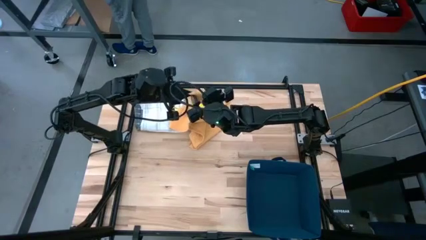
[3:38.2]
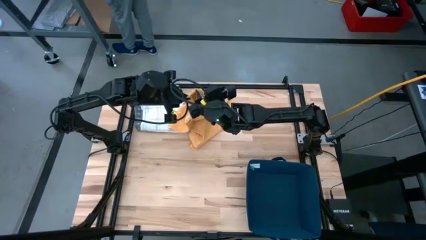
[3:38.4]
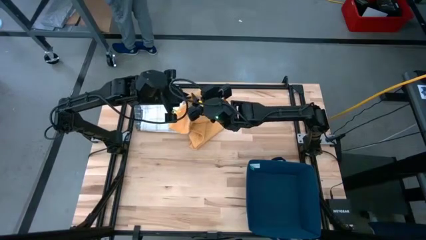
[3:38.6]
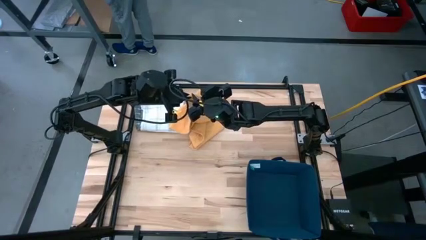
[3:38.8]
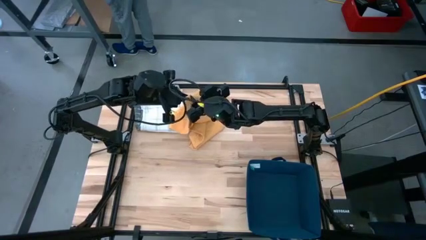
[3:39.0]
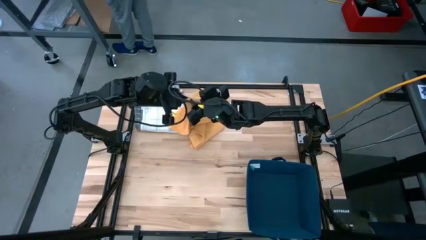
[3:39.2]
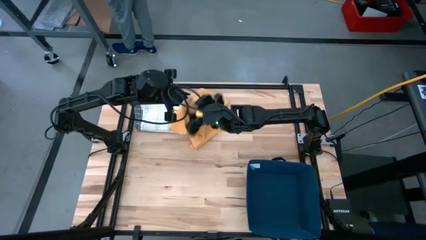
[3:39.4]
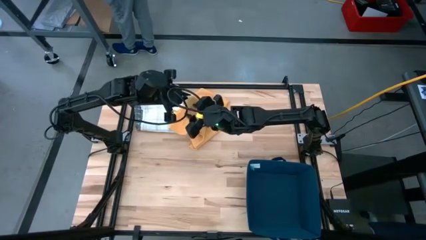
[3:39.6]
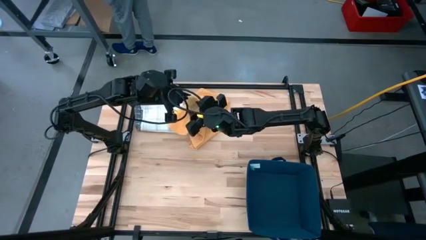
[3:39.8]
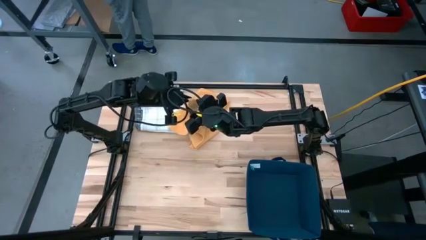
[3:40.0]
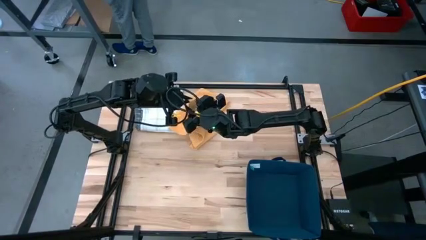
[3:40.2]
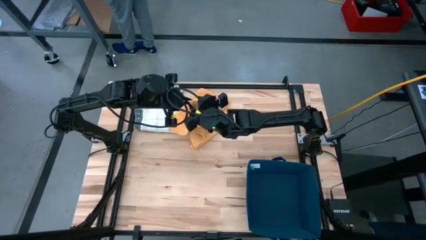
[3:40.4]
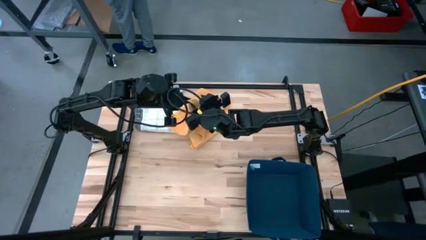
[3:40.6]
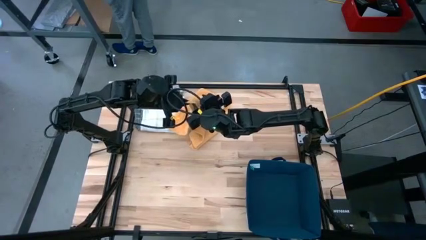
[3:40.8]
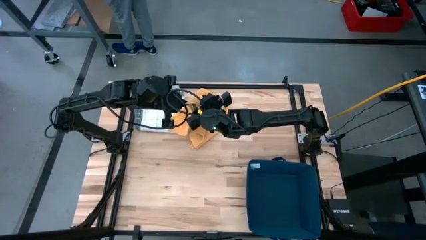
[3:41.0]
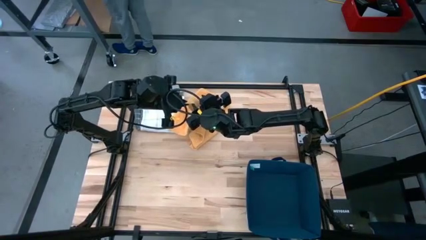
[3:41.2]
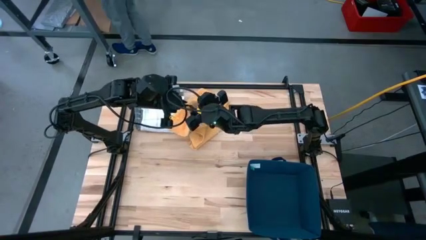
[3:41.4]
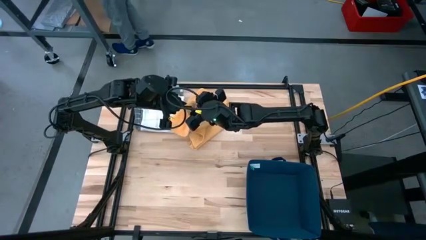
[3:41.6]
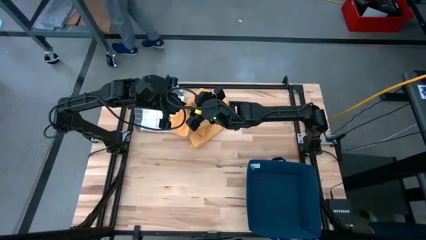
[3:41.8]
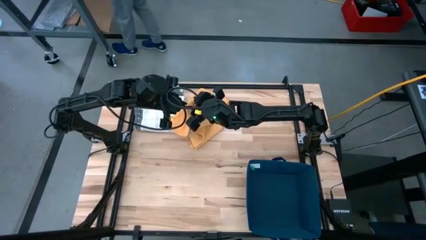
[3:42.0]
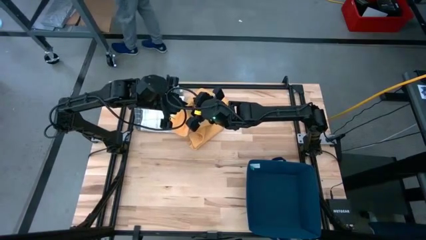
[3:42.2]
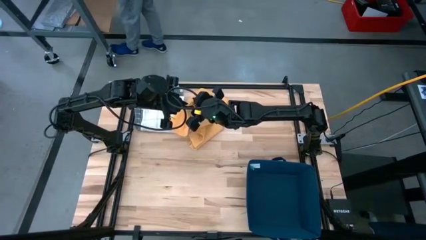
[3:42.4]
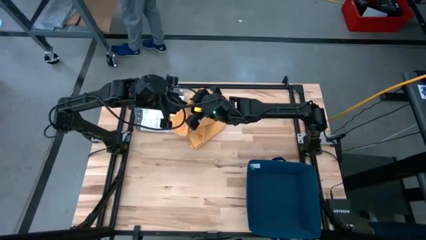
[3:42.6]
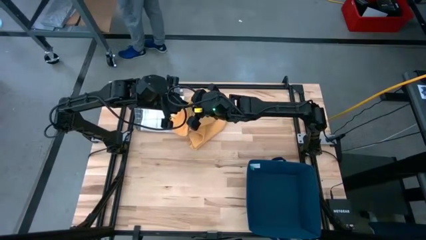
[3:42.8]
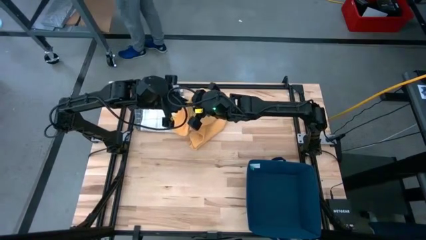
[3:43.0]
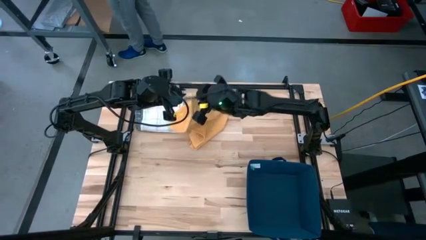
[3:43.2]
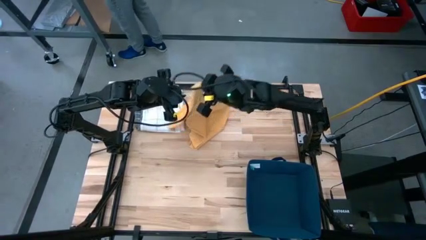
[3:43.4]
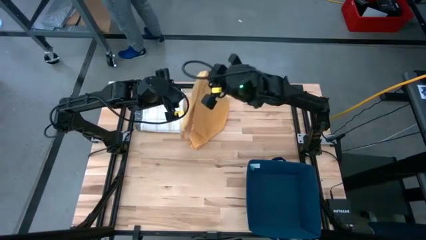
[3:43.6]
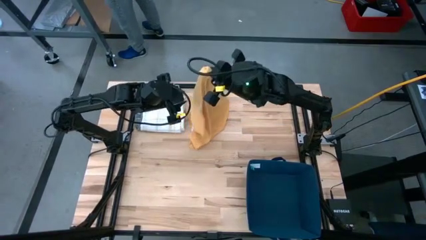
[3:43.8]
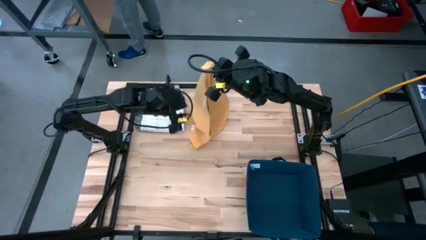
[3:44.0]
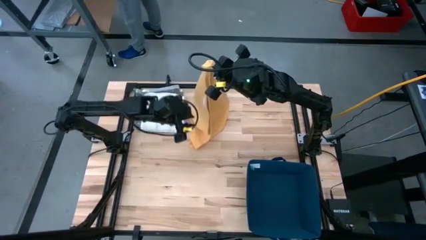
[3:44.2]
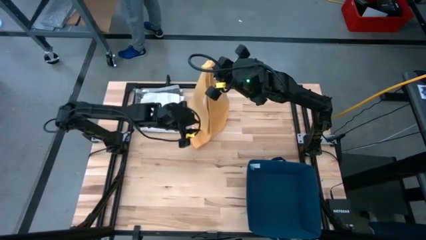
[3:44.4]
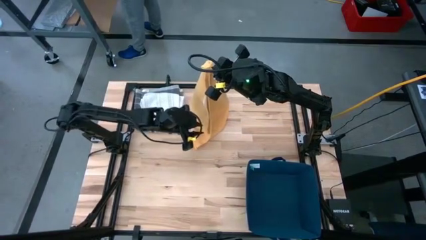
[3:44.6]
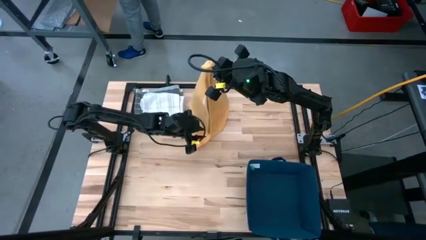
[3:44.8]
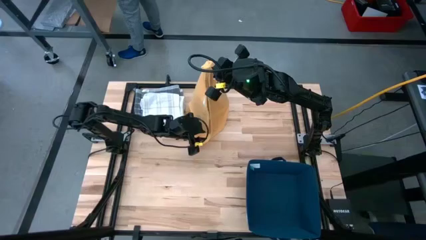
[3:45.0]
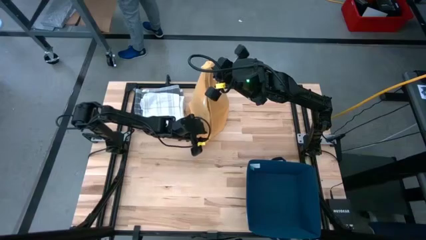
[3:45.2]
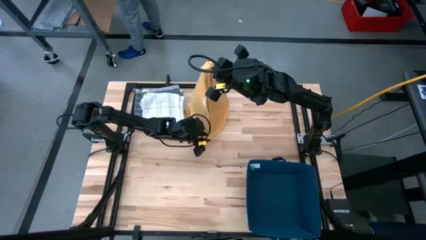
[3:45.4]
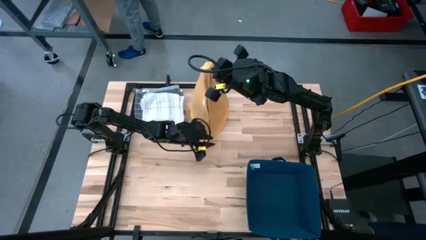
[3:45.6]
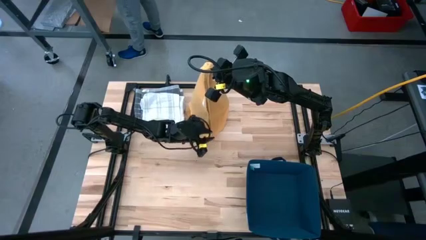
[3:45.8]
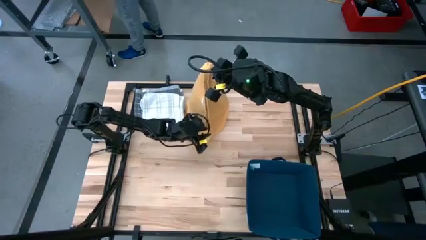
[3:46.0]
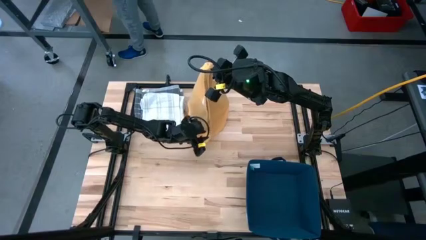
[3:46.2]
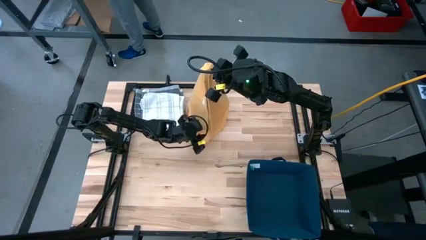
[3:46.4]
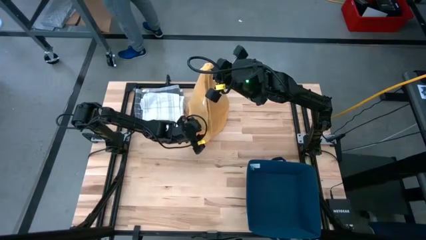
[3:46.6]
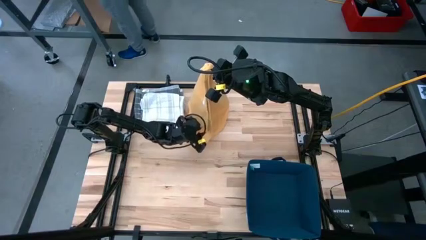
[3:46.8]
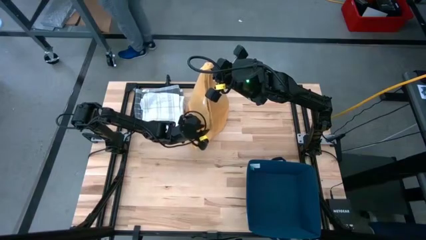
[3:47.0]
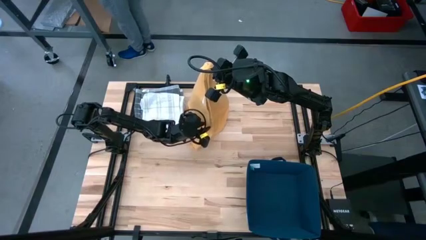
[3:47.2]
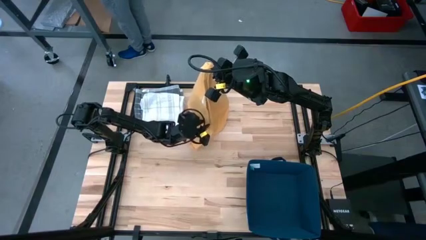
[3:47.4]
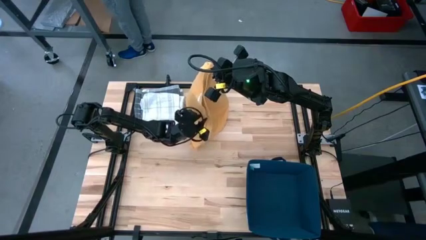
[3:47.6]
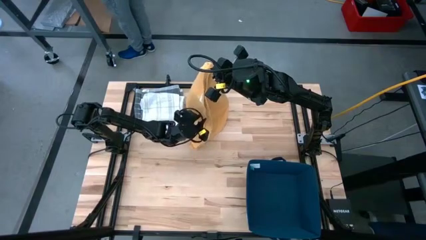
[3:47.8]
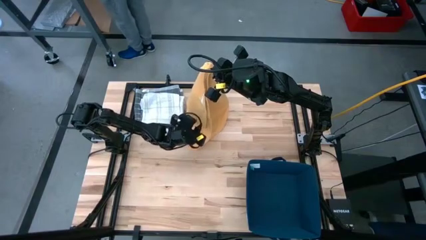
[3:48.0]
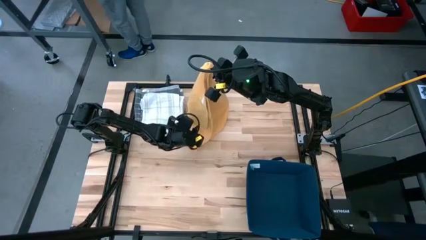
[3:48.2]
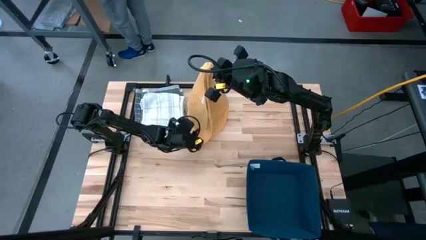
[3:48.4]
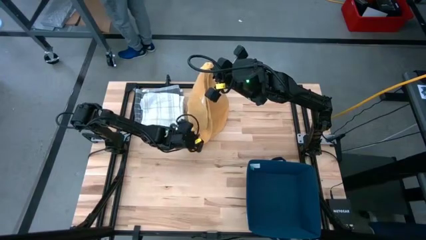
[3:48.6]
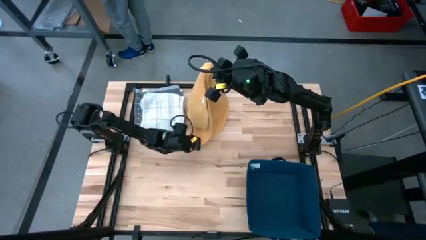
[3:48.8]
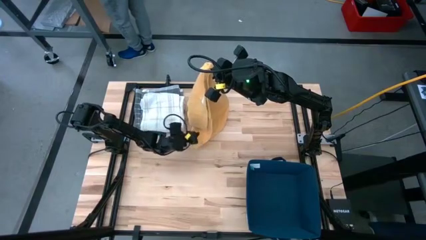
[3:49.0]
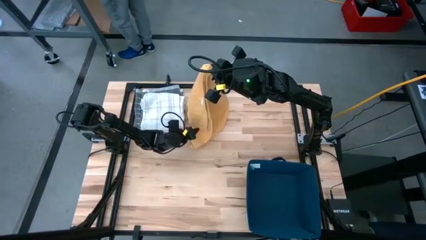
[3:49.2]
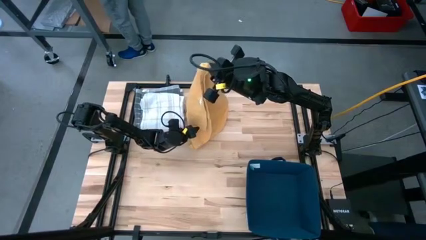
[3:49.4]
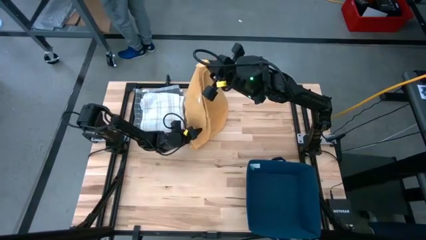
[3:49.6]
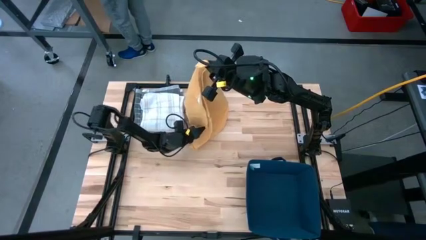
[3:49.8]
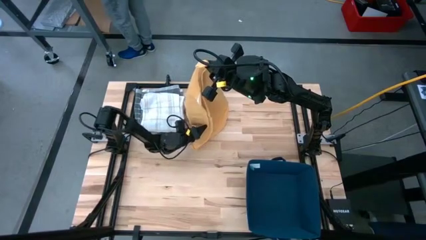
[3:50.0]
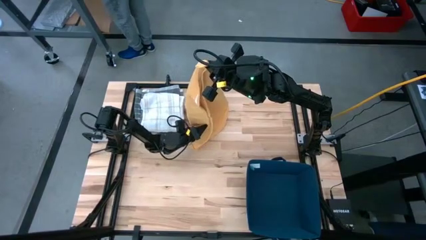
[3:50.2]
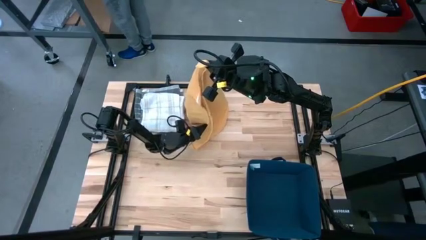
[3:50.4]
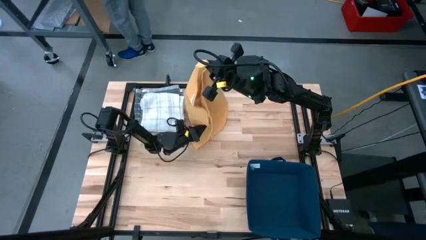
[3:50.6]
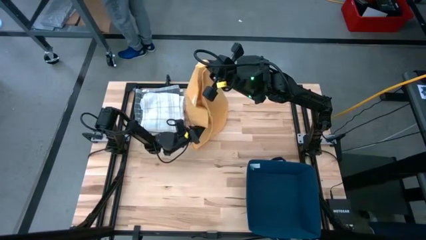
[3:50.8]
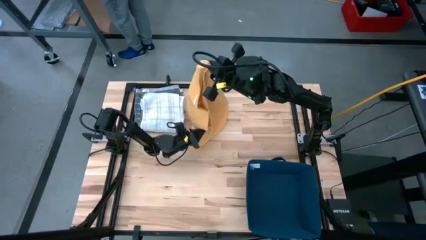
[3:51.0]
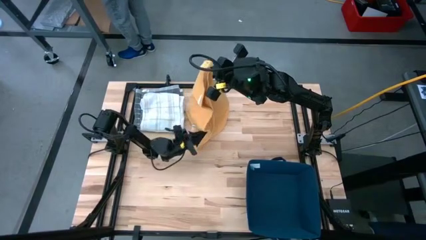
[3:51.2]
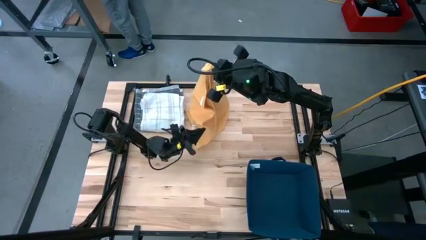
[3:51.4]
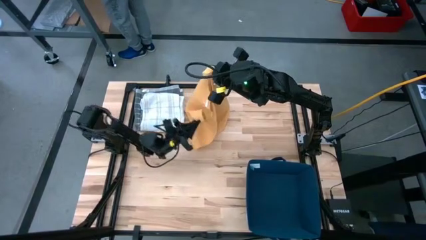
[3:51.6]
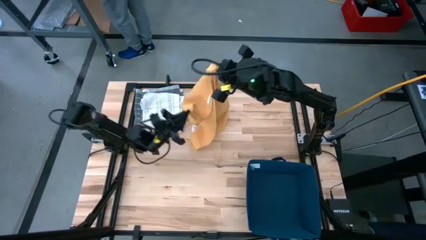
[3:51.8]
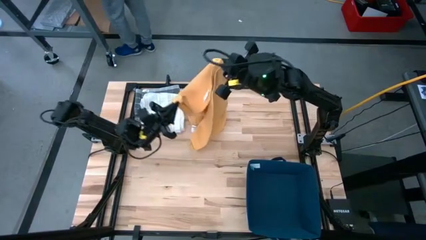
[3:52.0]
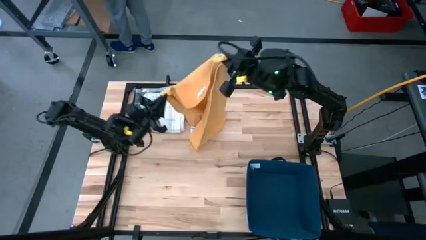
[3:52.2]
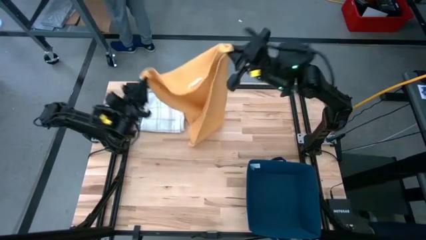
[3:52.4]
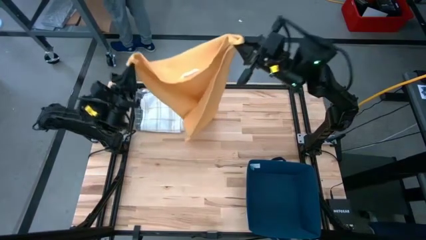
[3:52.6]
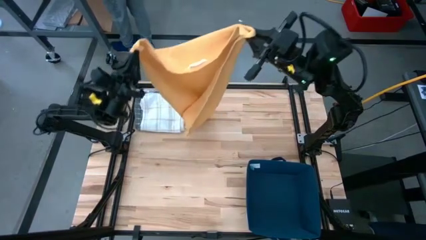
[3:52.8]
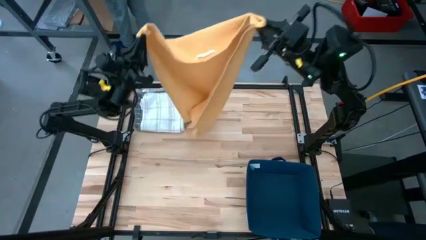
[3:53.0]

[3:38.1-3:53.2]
Task: Fold towel
Fold the yellow towel

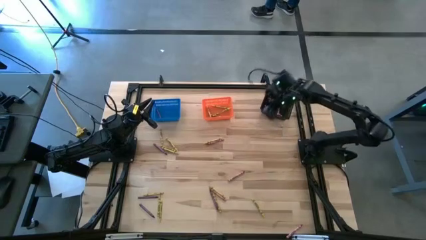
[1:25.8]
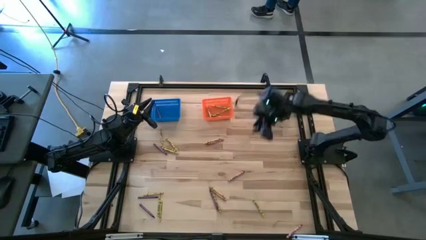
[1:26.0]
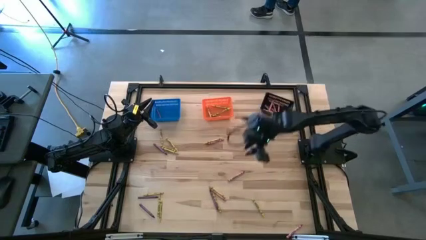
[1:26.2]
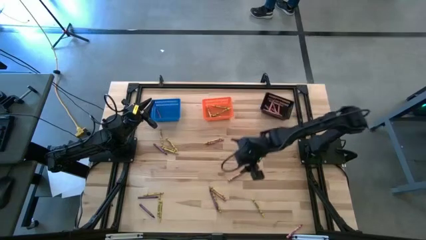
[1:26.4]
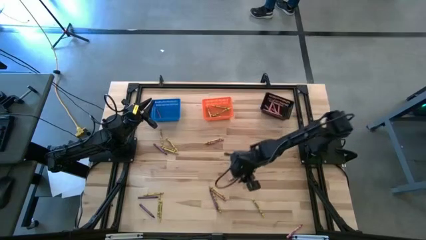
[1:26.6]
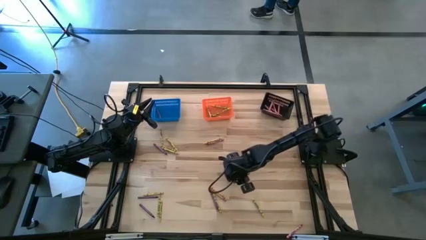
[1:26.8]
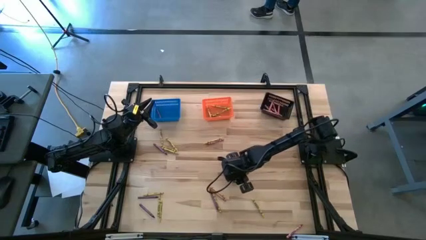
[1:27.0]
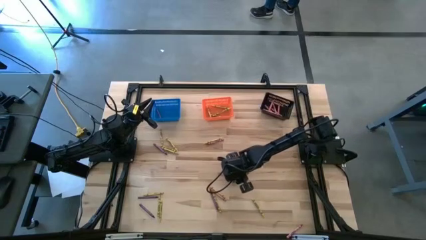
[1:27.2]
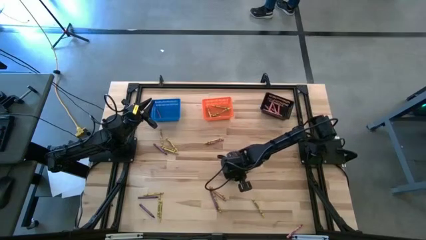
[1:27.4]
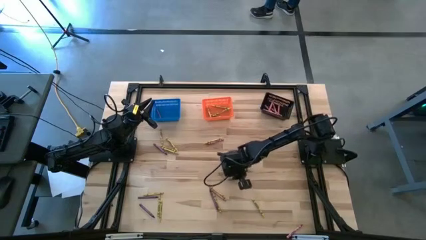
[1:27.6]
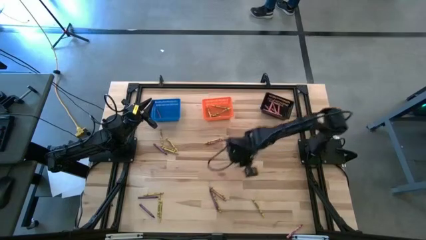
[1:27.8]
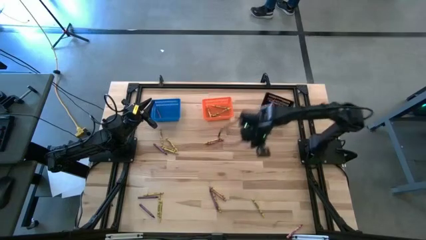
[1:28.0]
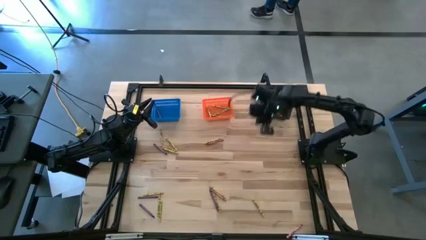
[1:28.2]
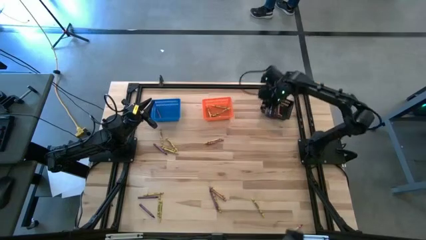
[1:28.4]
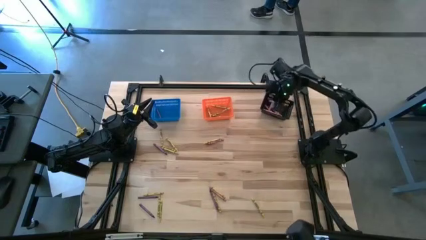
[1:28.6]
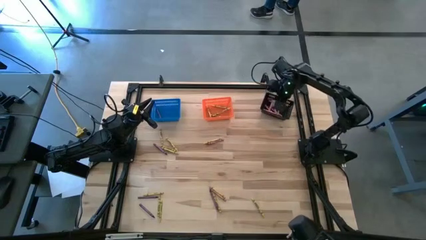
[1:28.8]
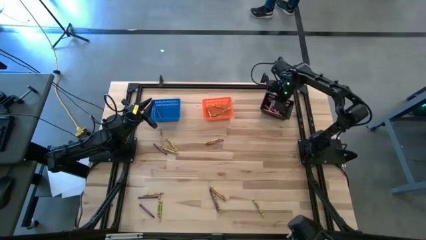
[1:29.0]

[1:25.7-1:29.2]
Task: Sort crayons
Put the red crayon into the black bin
